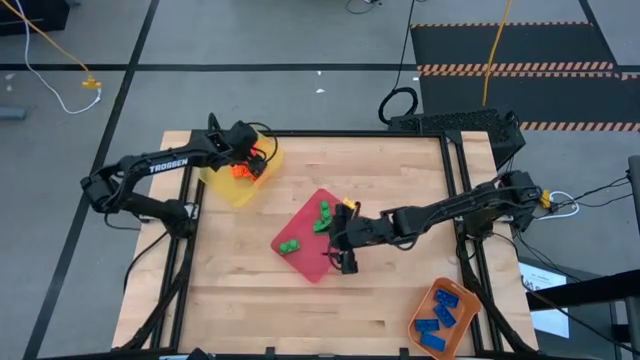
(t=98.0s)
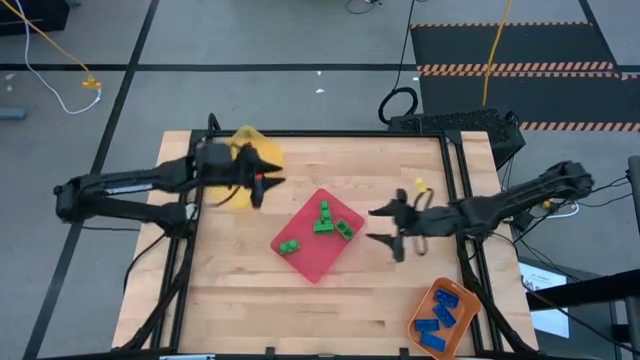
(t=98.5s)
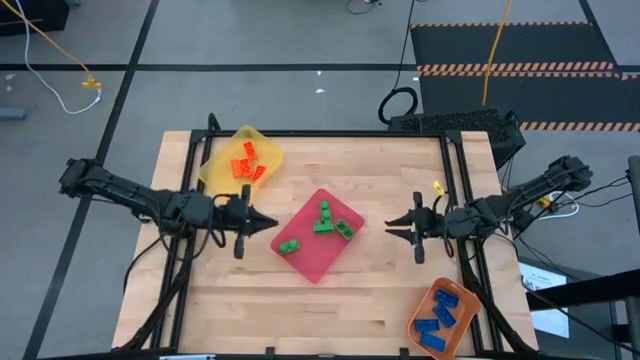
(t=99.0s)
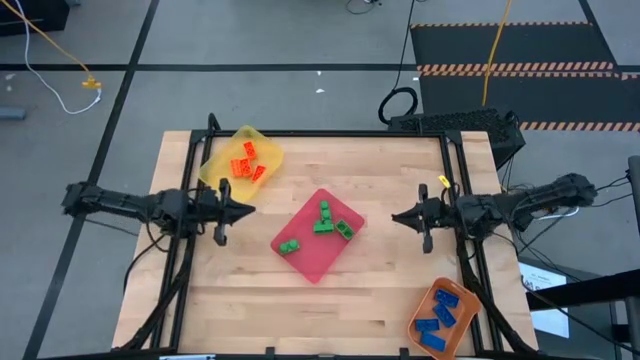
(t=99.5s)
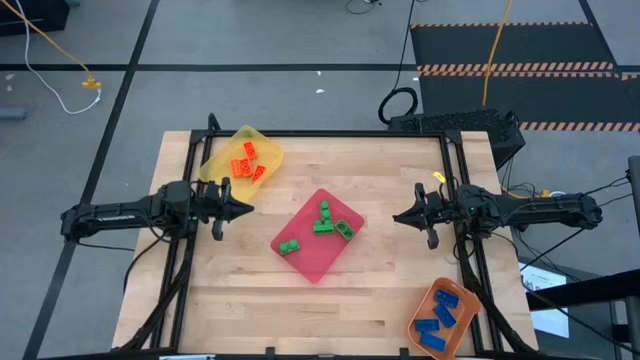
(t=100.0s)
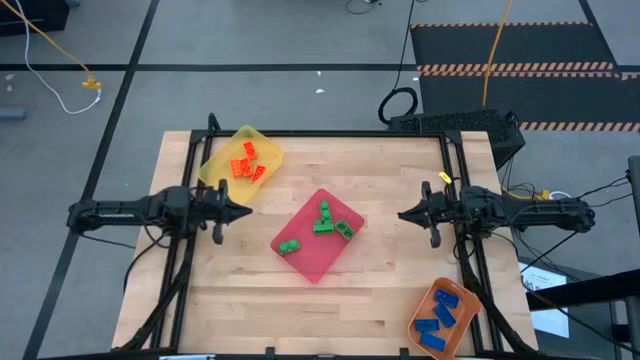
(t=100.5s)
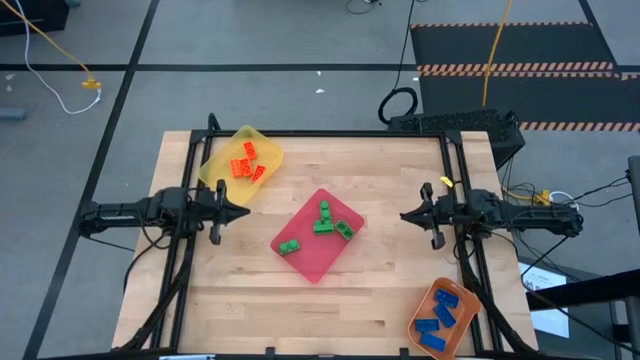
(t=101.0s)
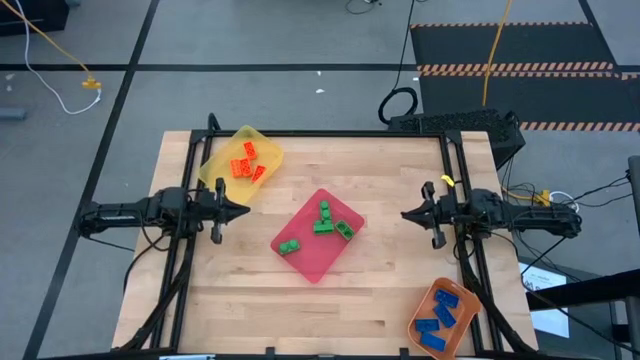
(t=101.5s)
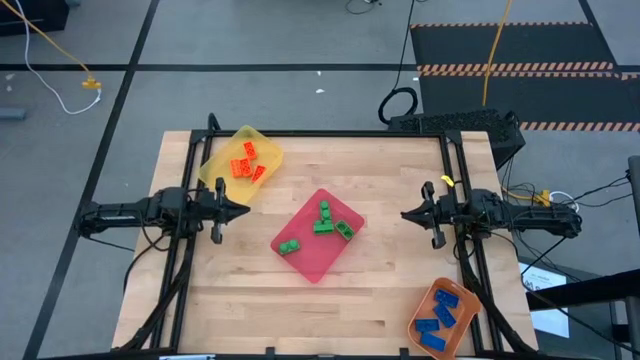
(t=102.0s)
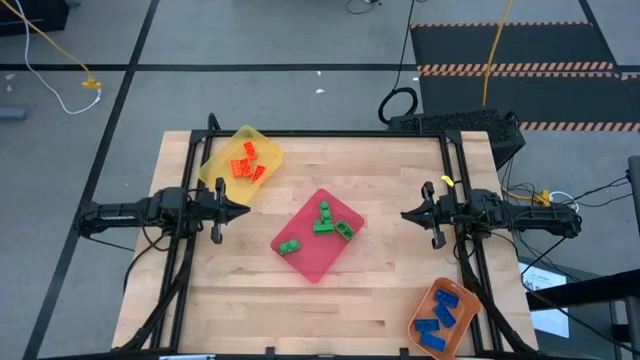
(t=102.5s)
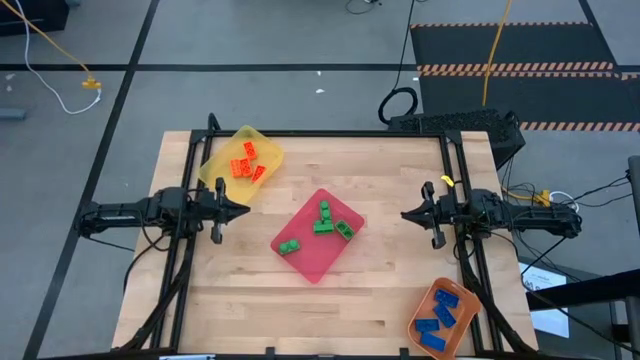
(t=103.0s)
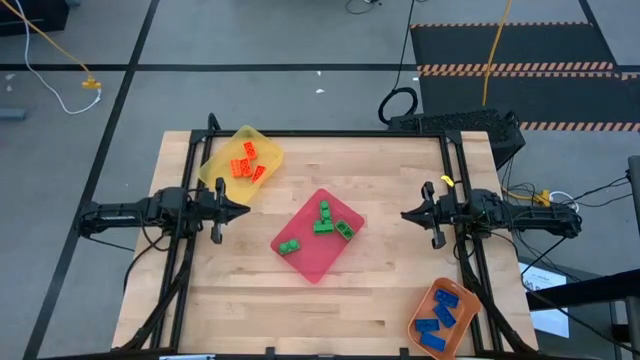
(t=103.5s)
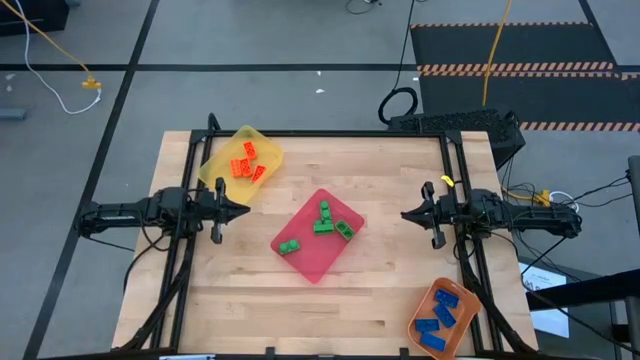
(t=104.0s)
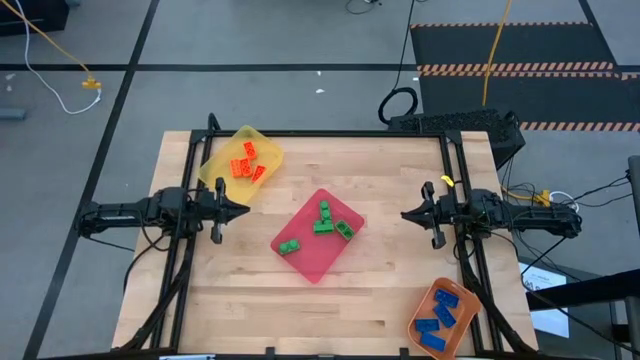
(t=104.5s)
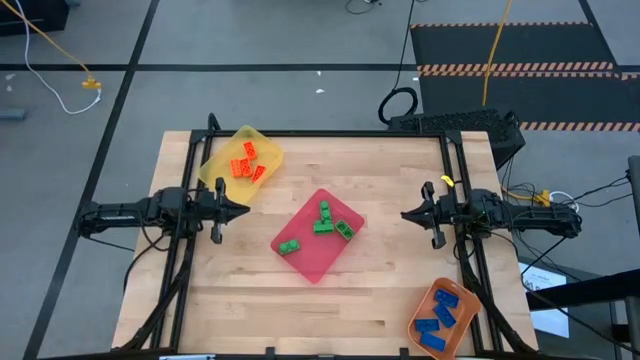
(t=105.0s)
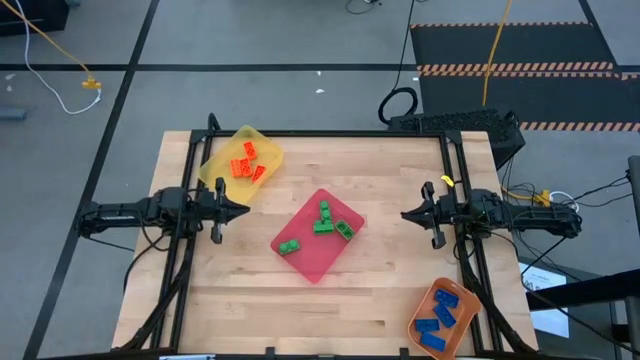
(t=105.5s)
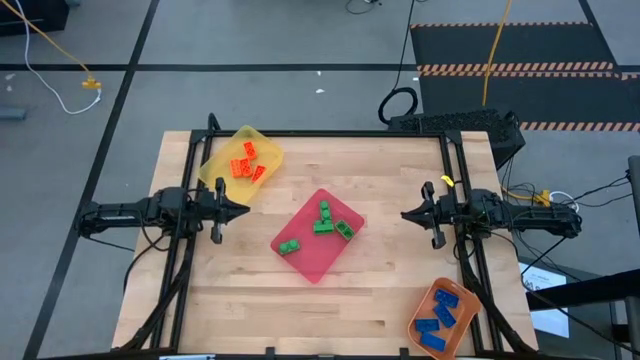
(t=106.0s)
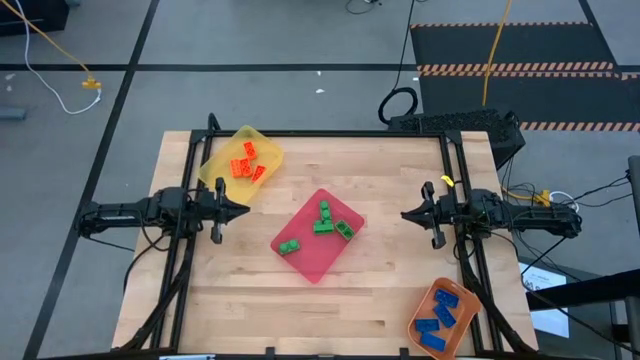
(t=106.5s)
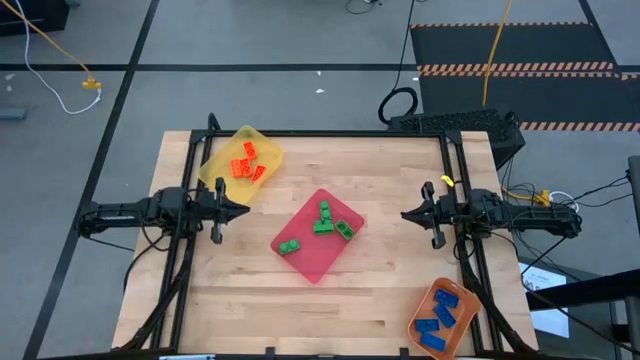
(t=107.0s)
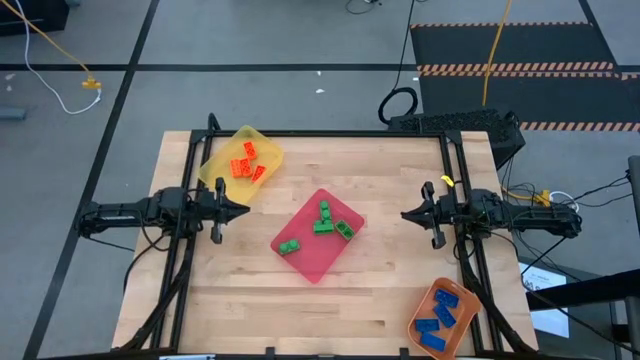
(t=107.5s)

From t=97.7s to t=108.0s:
Task: Sort & place blocks by color
Return to Home Position

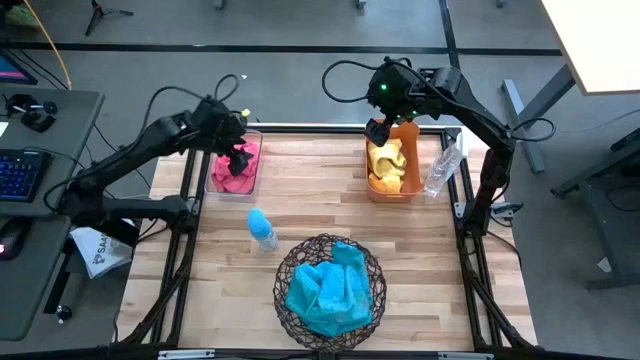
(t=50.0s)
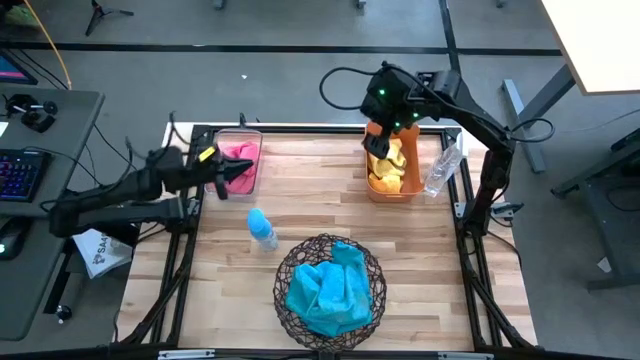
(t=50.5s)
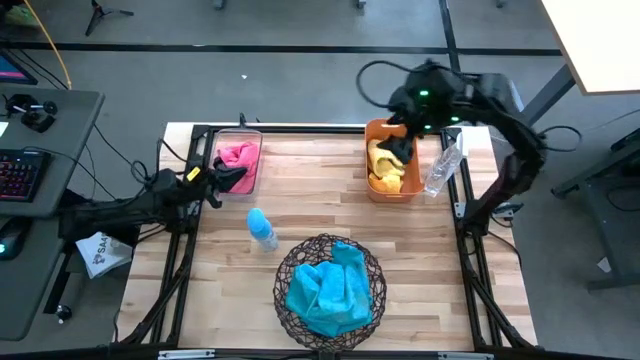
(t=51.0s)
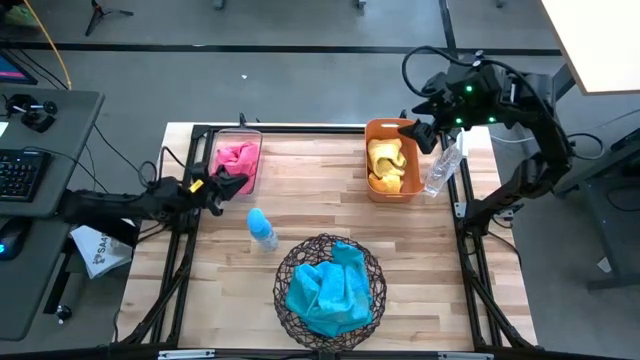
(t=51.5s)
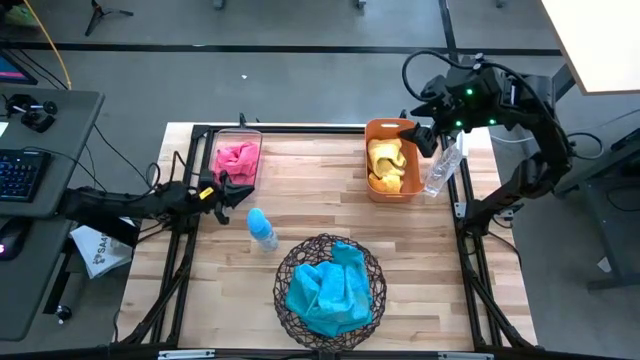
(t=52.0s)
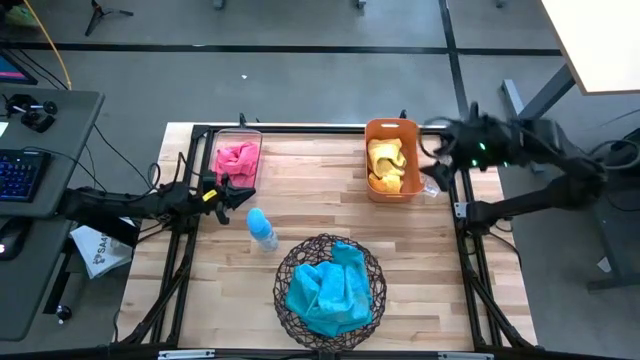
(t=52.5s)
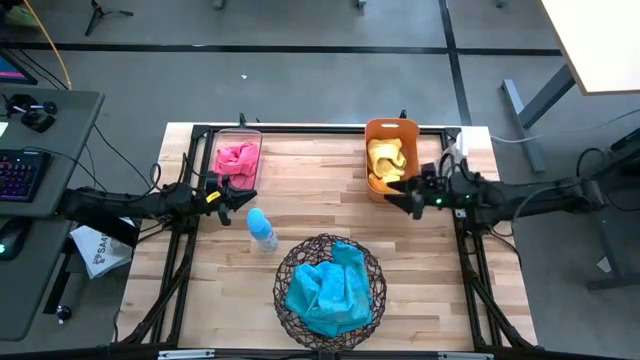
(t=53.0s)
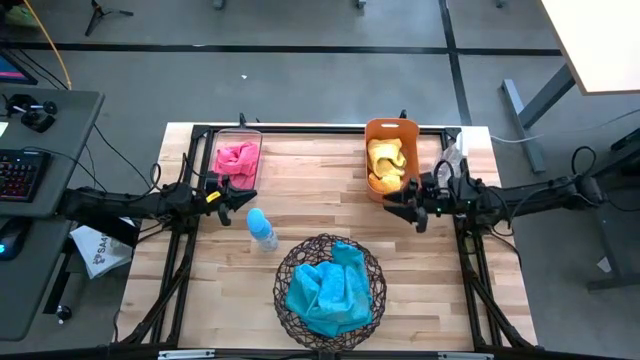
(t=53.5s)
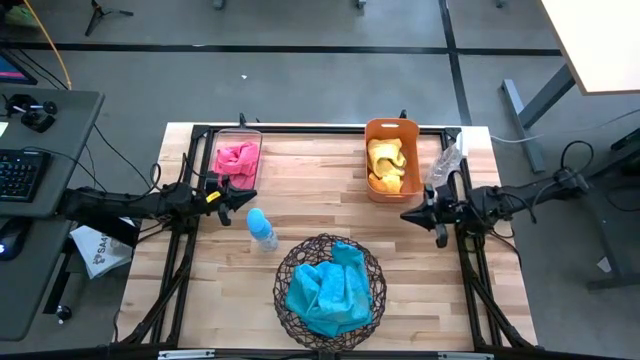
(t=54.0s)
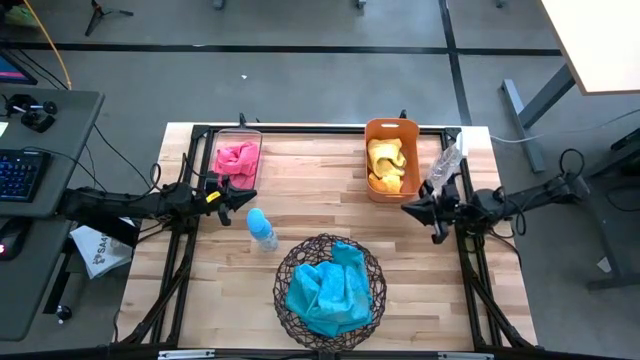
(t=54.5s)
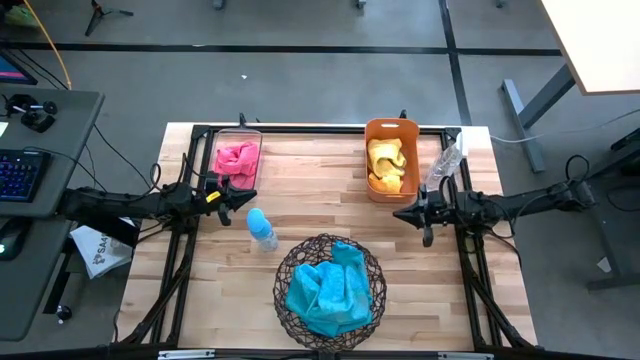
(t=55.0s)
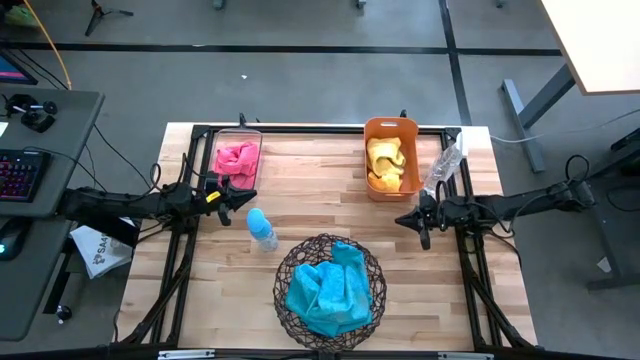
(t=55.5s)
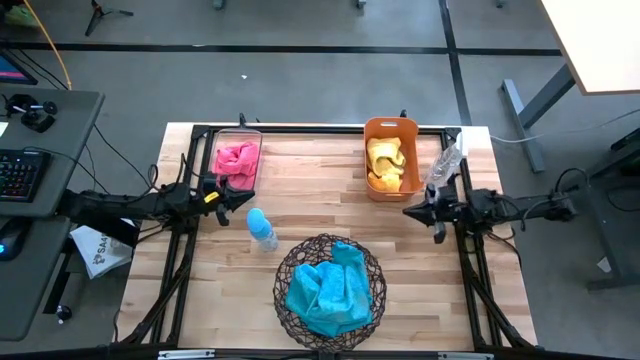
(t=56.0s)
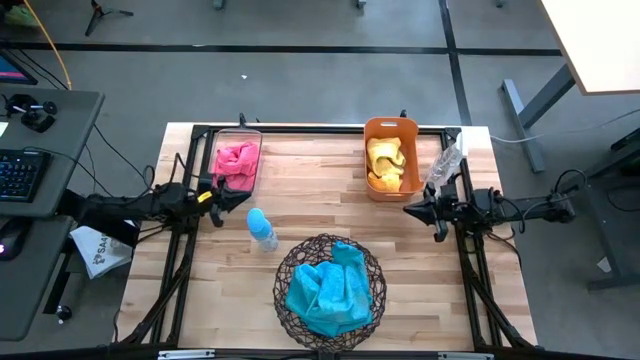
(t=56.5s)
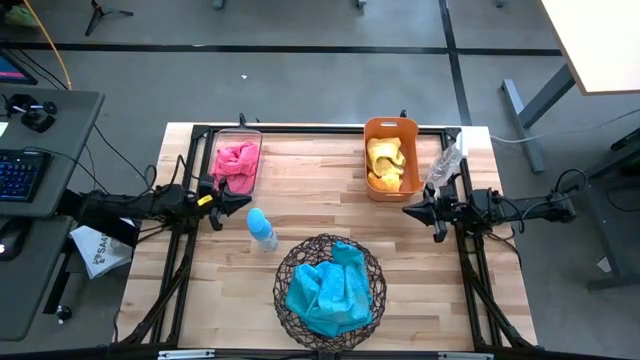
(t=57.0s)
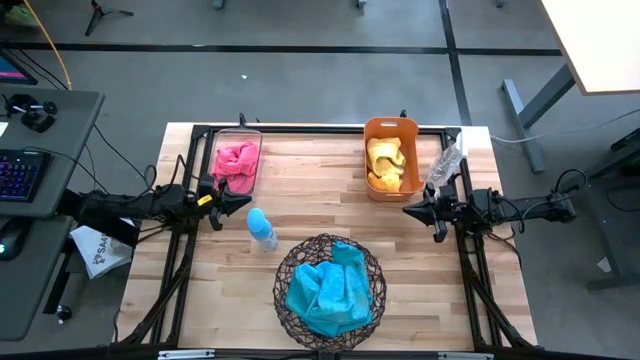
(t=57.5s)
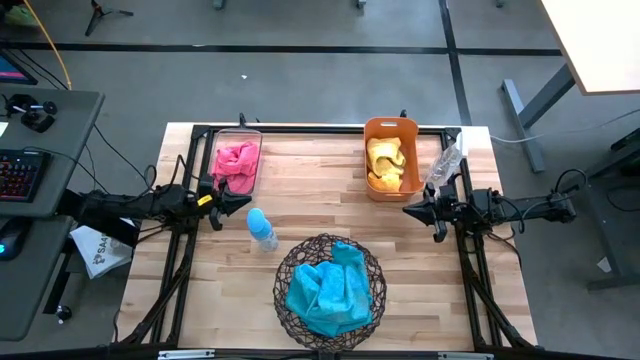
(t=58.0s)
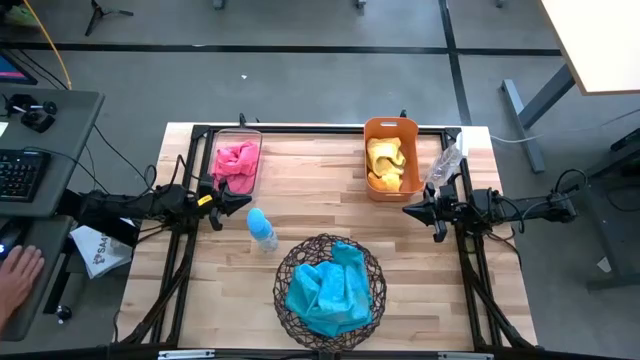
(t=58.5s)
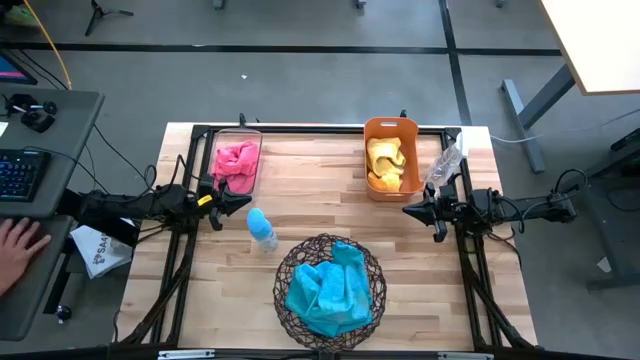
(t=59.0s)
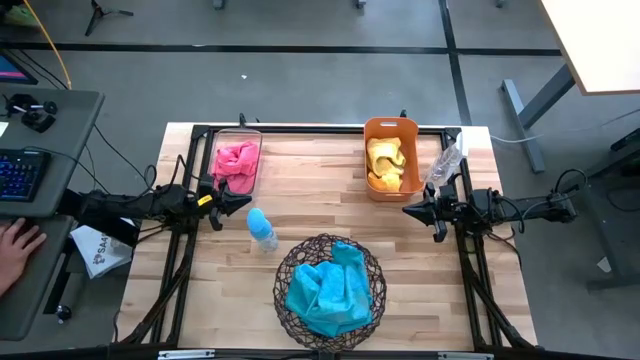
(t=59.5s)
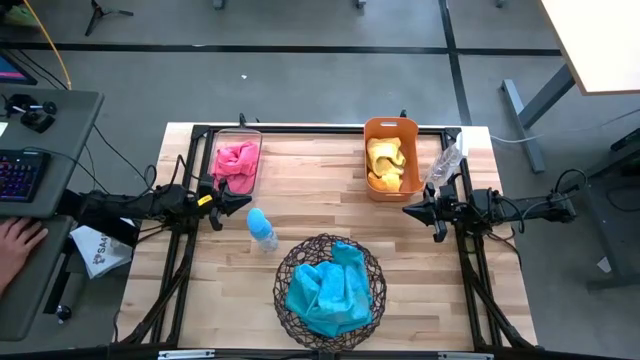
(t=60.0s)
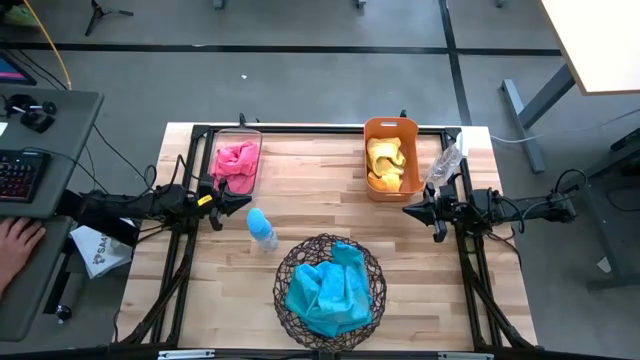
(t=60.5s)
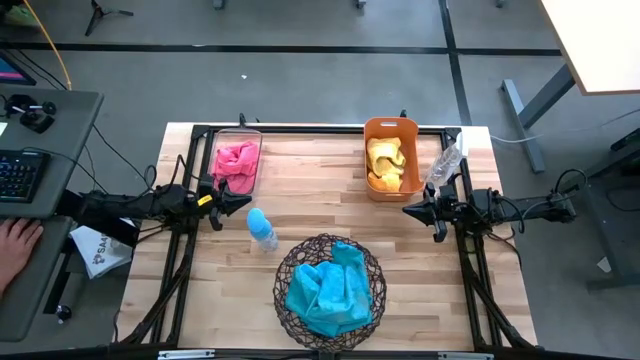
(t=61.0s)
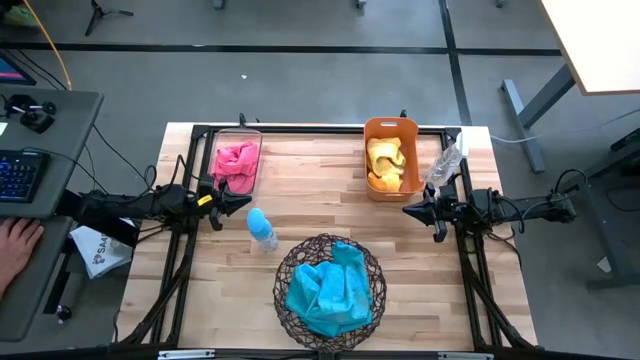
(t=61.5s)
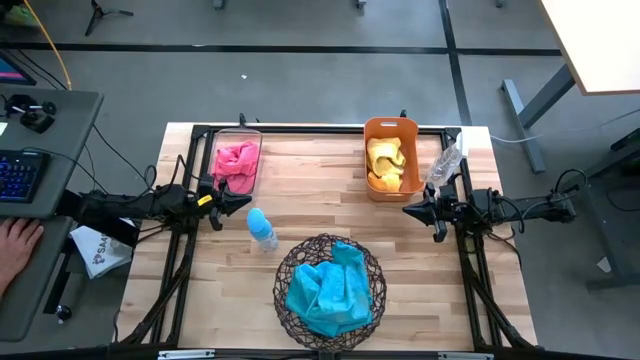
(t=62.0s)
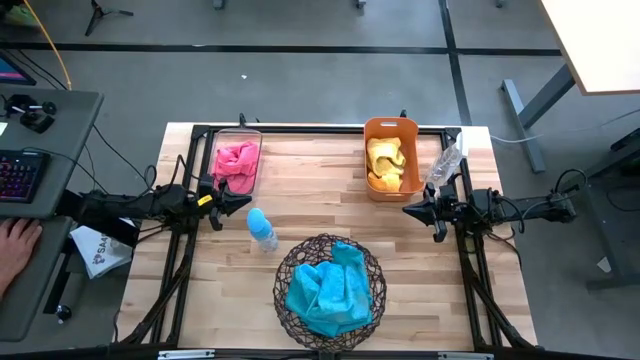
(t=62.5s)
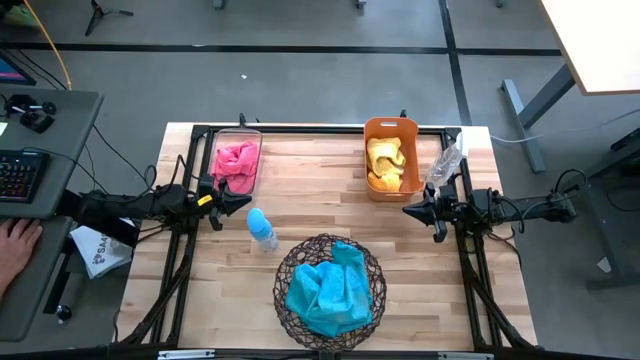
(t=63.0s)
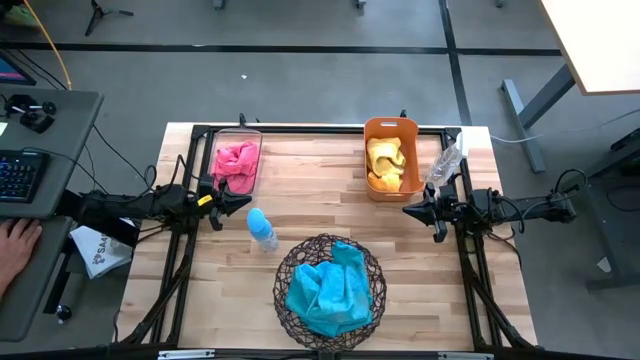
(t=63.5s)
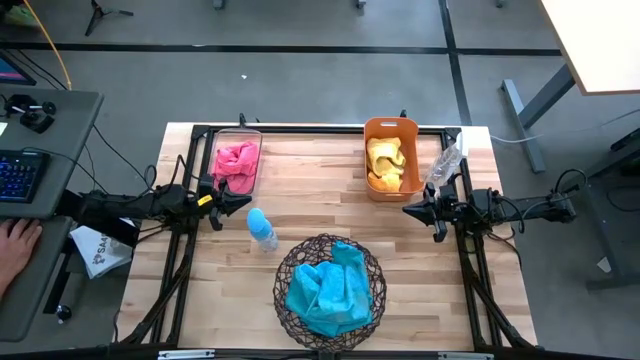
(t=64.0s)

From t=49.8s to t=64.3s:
Task: Sort microfiber towel by color & place in baskets
Return to Home Position
